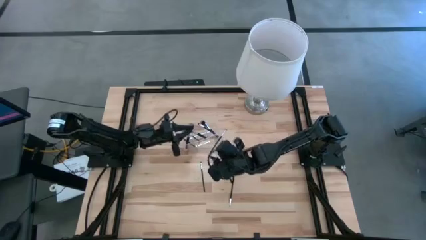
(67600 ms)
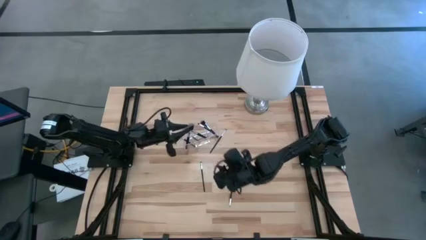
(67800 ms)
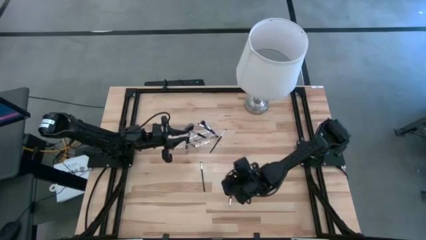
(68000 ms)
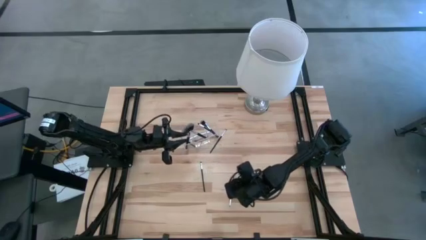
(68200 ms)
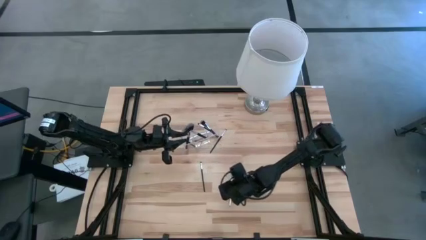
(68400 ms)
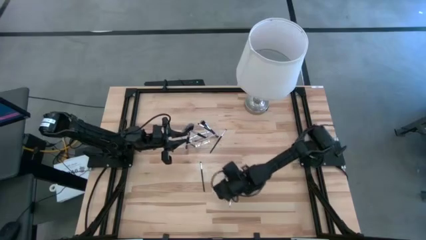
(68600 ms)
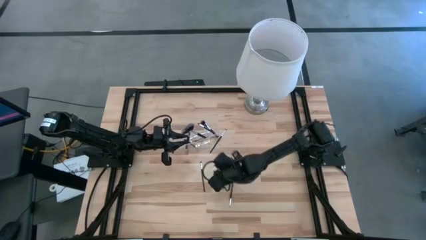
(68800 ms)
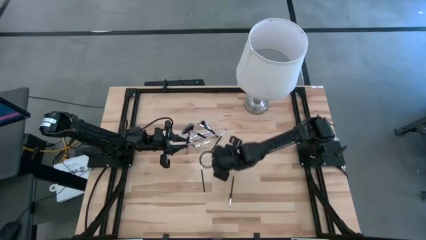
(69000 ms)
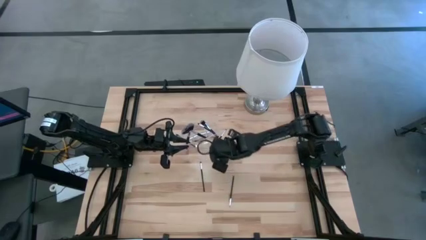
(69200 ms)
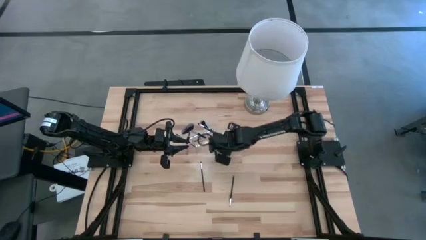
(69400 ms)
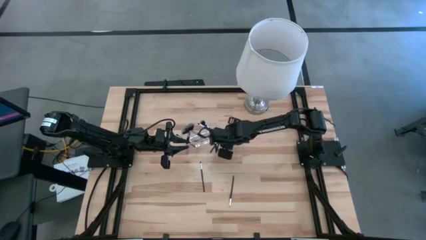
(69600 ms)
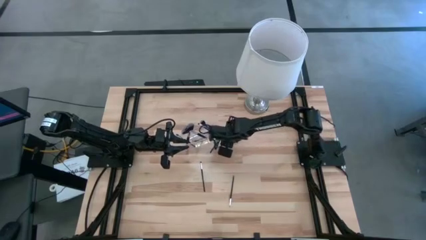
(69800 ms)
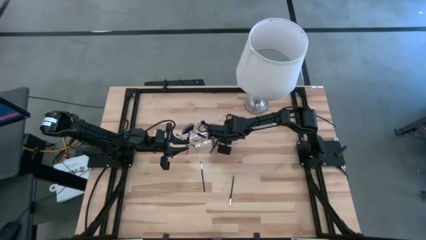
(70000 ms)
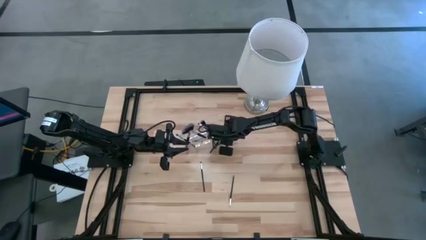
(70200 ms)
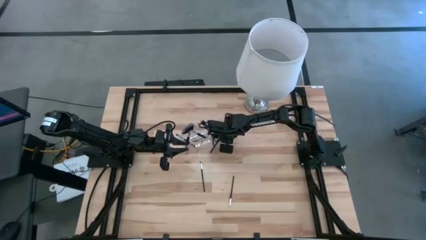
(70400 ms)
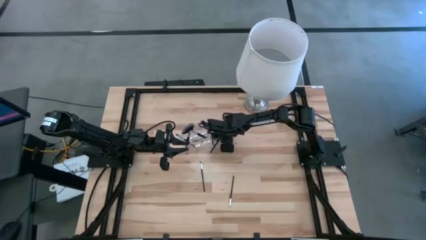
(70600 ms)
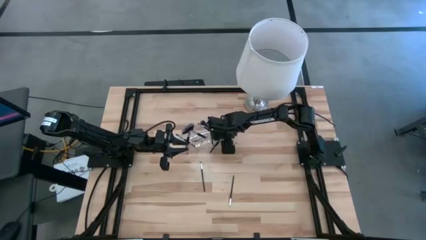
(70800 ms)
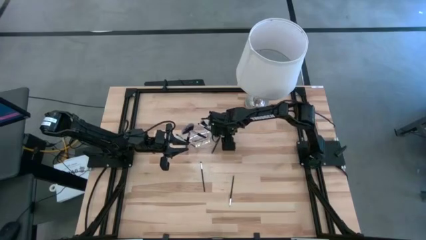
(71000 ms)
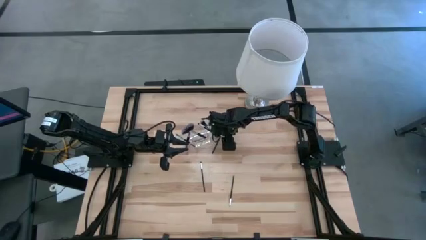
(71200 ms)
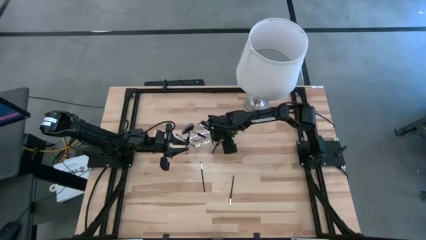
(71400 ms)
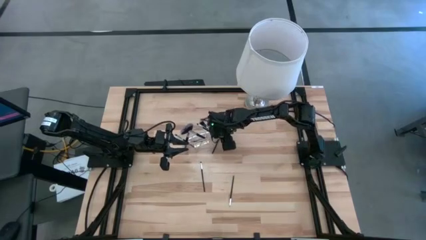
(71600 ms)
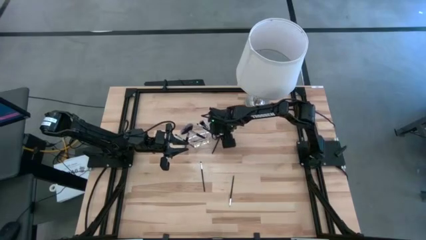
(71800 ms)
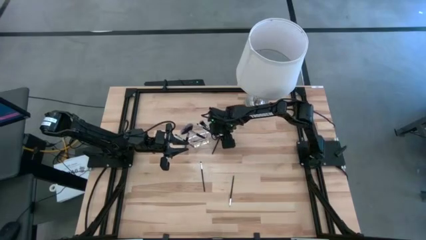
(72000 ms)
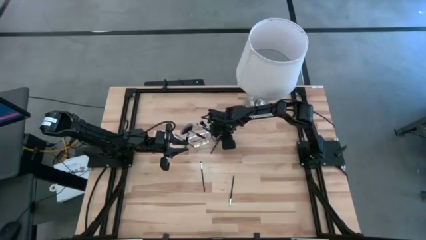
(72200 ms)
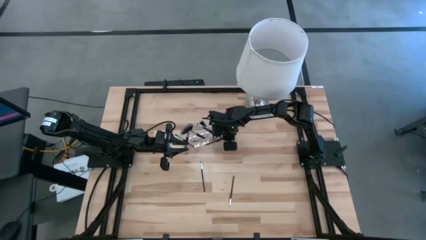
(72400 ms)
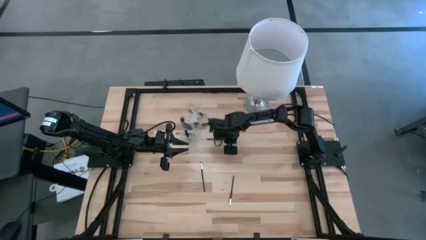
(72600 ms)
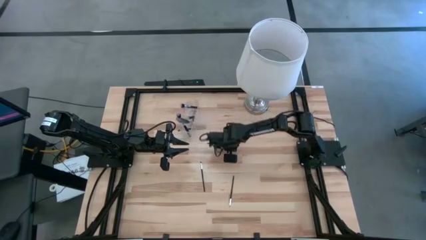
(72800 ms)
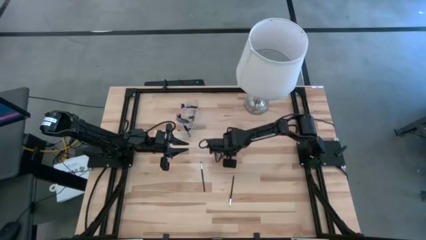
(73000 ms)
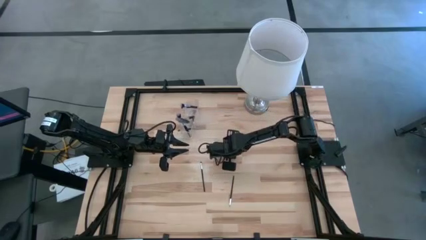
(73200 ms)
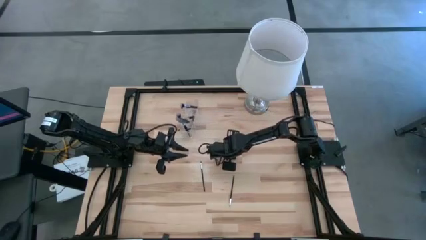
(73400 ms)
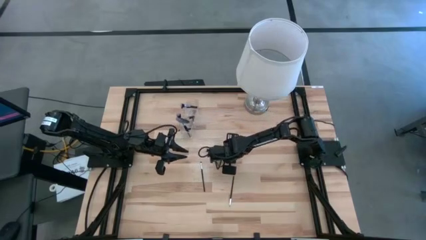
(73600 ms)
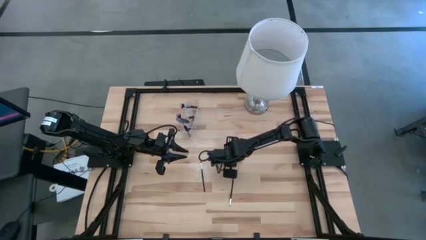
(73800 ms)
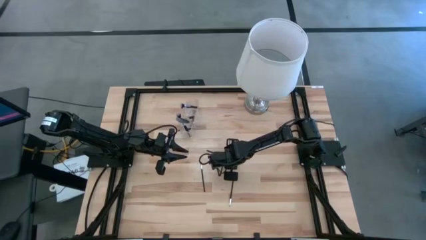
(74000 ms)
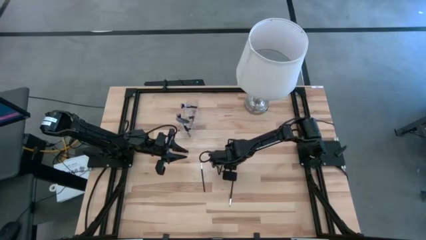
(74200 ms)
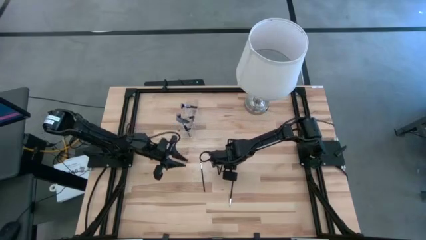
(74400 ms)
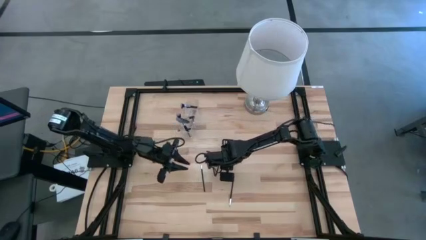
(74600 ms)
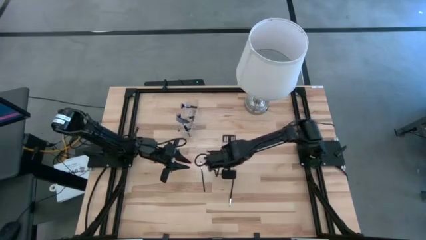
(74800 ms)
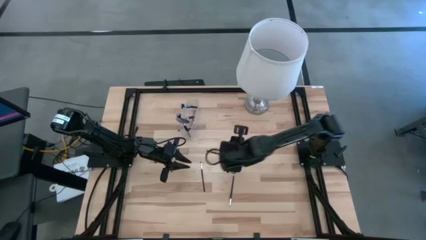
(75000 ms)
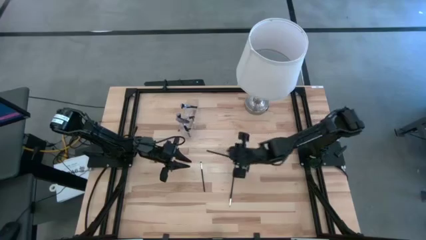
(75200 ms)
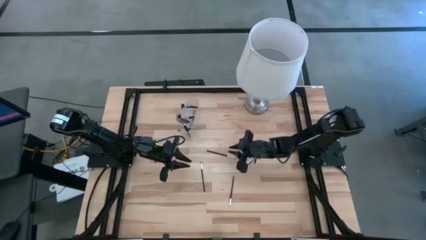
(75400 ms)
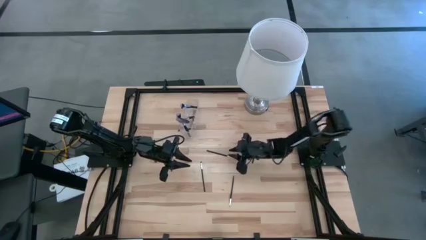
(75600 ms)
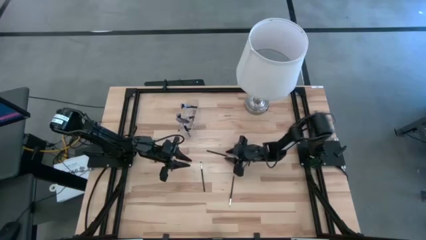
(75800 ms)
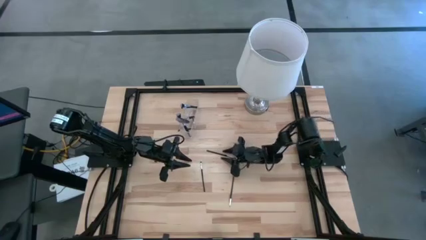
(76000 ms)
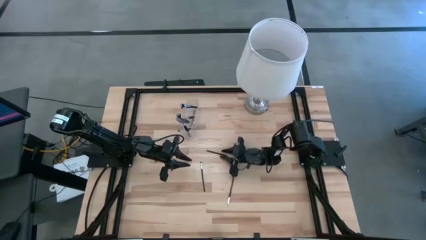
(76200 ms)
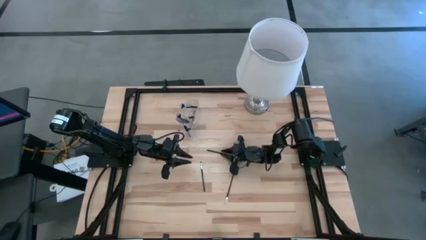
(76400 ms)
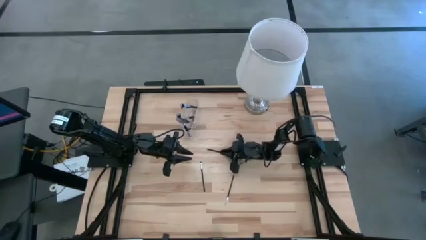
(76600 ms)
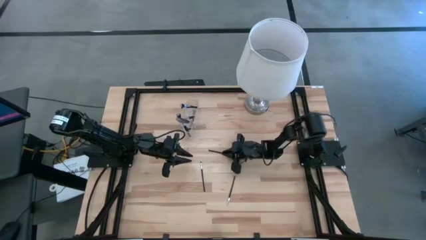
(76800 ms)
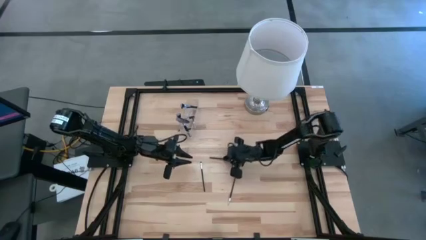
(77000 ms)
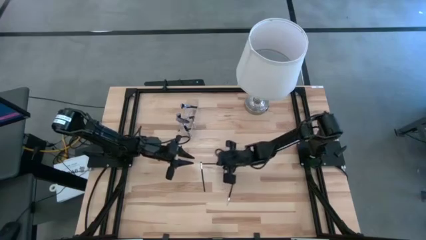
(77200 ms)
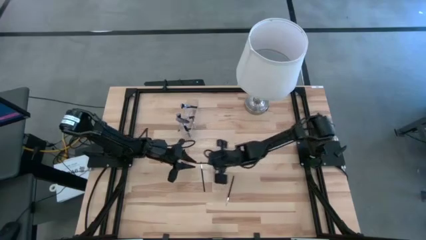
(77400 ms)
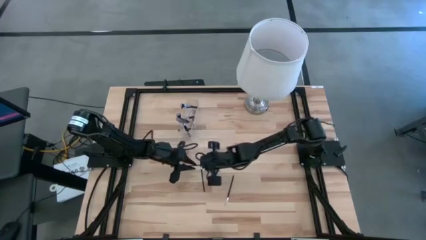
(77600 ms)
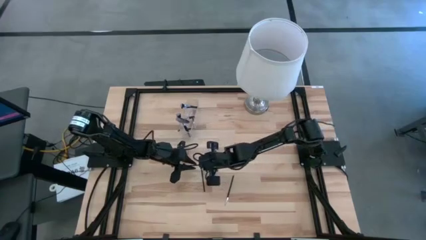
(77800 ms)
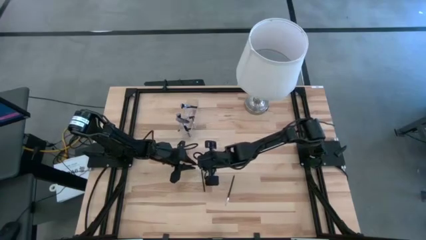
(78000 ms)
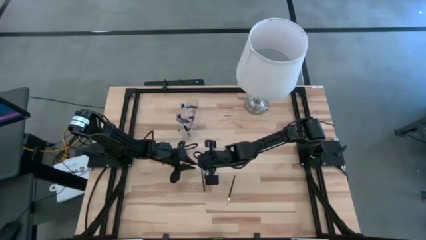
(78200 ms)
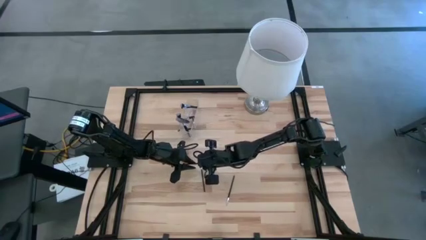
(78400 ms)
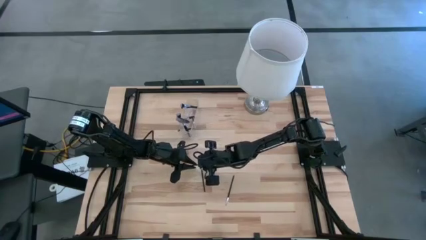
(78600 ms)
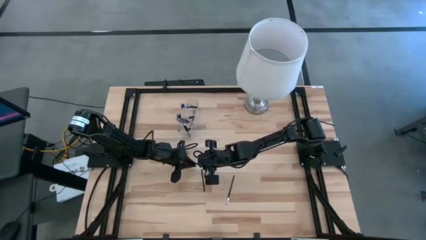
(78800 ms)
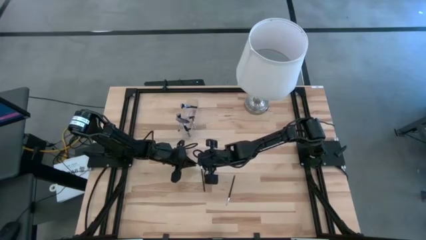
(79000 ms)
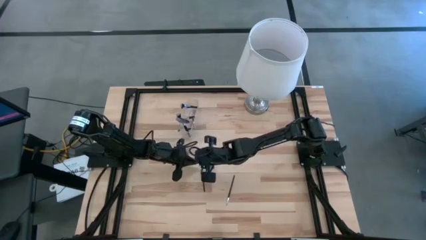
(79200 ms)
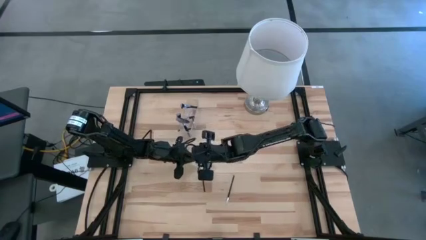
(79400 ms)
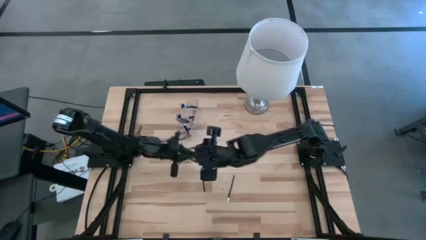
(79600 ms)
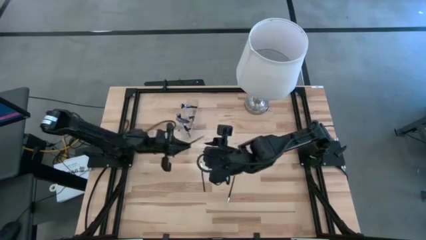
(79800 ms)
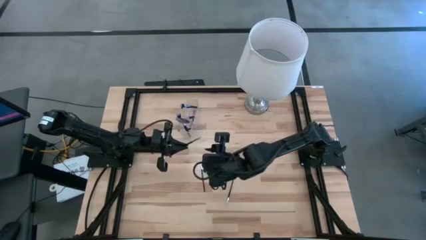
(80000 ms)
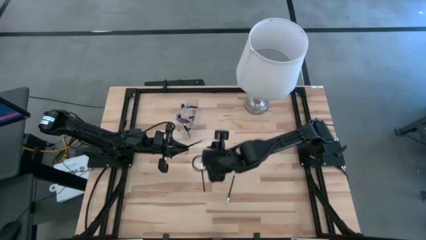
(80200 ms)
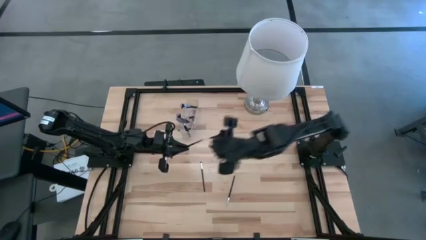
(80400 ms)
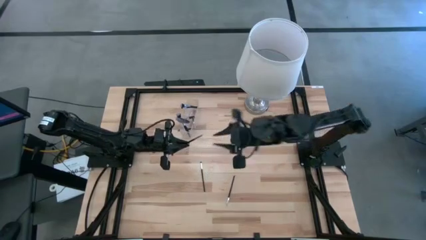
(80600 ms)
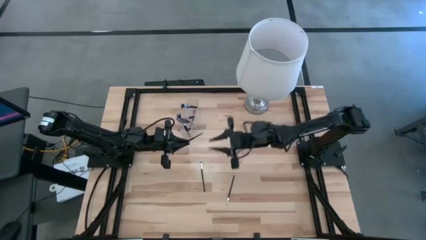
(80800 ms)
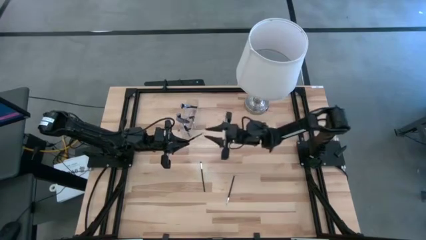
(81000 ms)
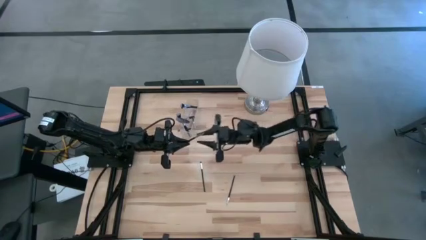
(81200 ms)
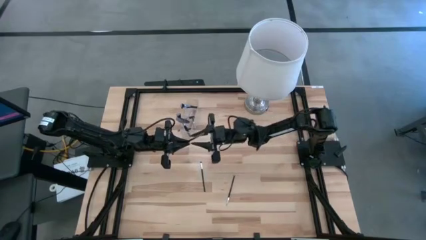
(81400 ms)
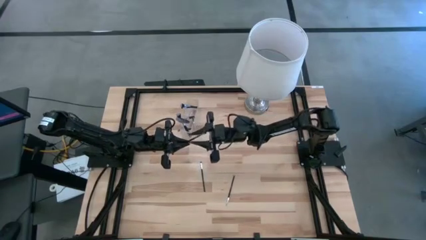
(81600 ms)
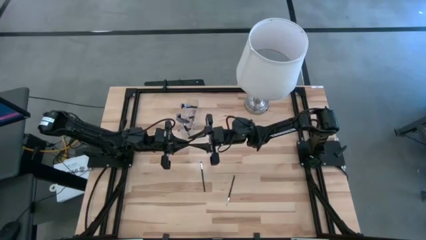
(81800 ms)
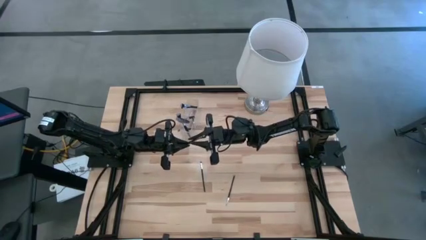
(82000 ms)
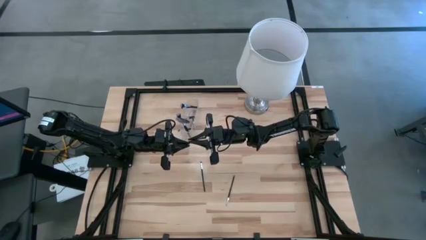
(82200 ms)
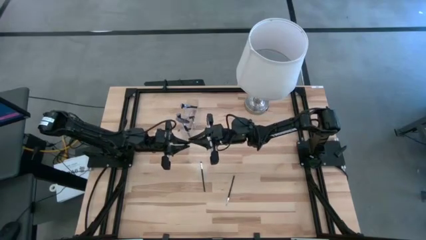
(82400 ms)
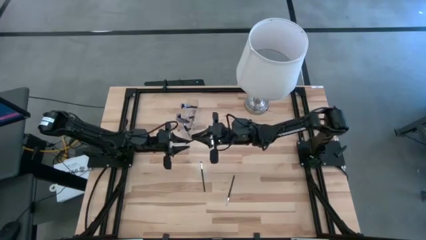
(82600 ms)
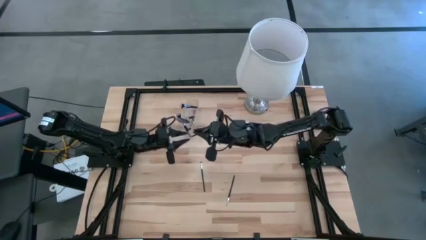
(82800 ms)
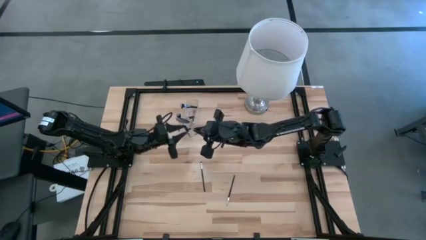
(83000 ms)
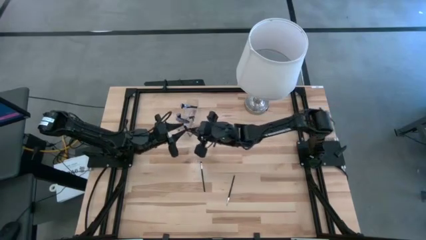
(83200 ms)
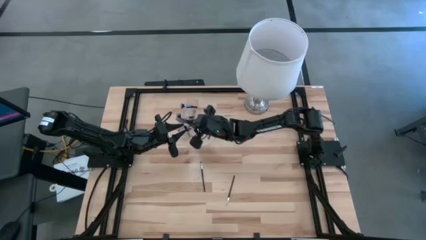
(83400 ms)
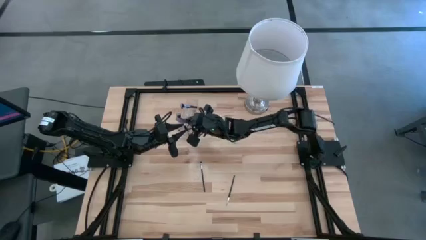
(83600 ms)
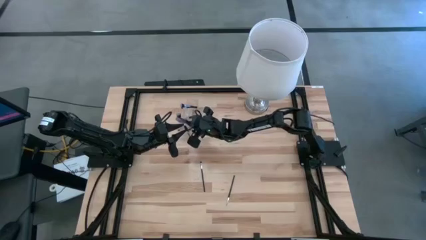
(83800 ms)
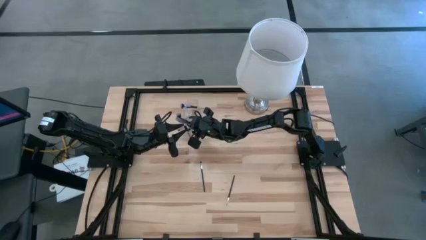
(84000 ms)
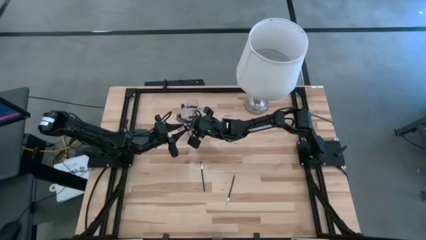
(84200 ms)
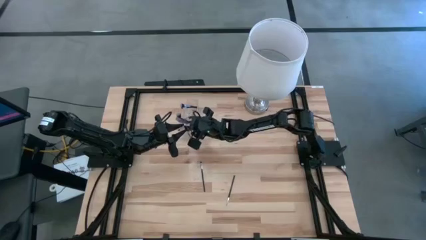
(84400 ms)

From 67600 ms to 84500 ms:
Task: Put items in baskets/containers
Put the foundation brush into the left transparent organizer
